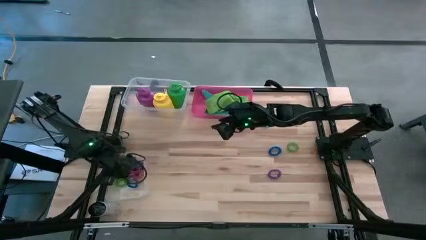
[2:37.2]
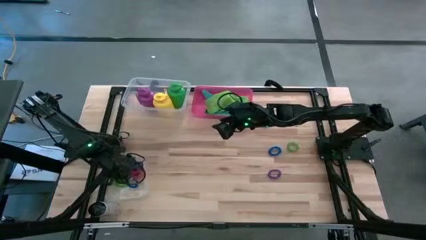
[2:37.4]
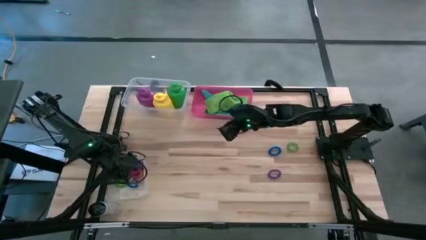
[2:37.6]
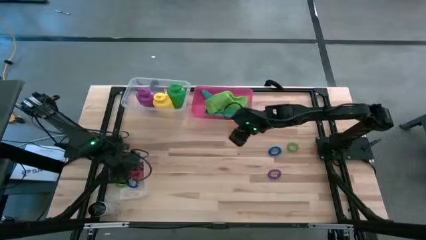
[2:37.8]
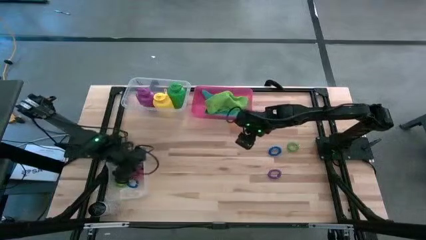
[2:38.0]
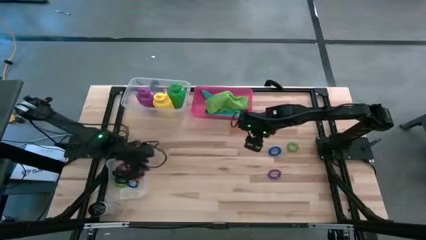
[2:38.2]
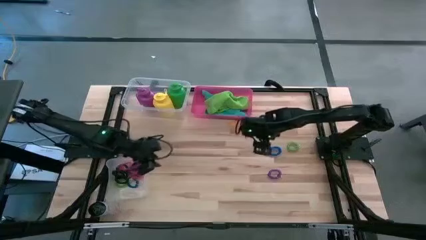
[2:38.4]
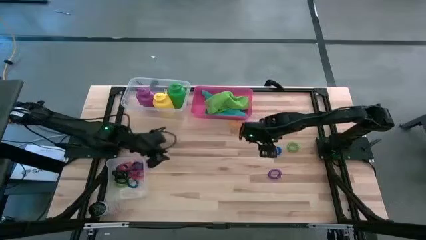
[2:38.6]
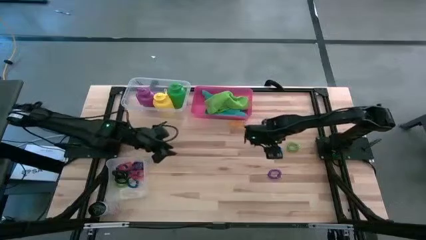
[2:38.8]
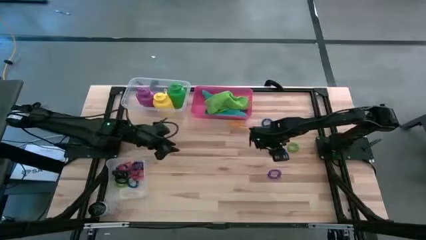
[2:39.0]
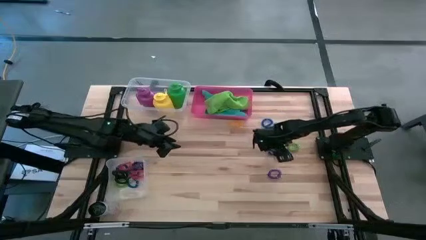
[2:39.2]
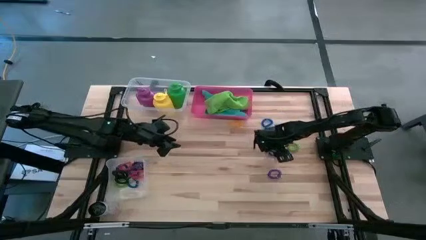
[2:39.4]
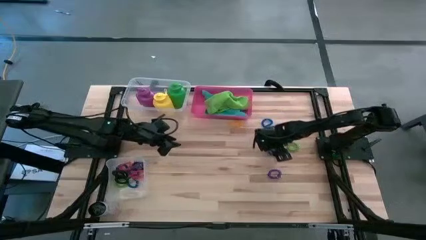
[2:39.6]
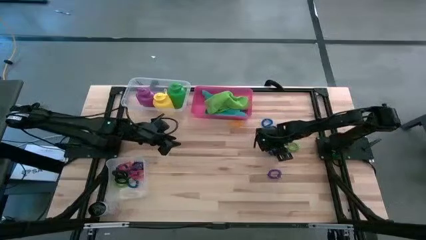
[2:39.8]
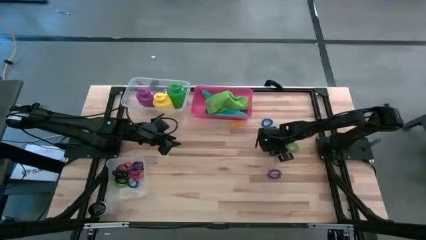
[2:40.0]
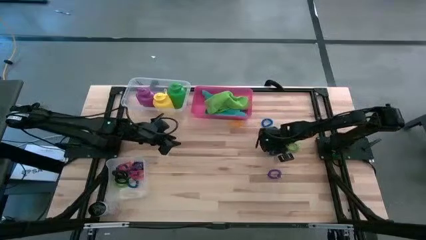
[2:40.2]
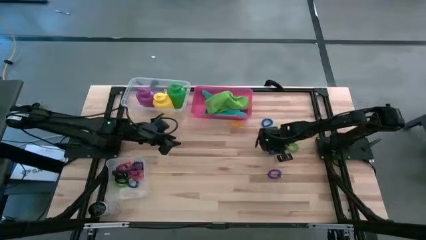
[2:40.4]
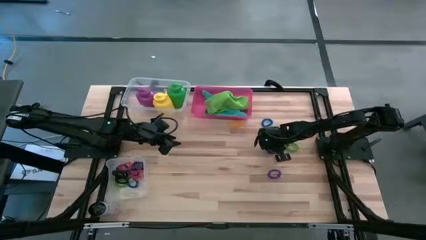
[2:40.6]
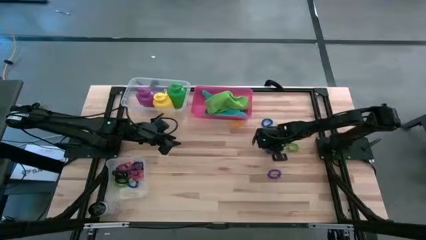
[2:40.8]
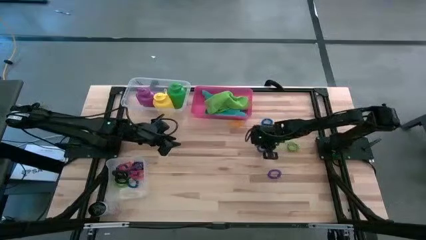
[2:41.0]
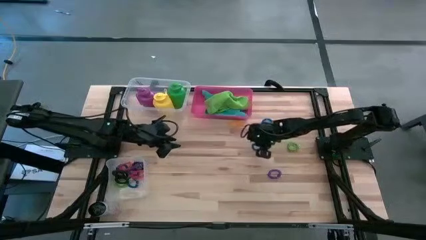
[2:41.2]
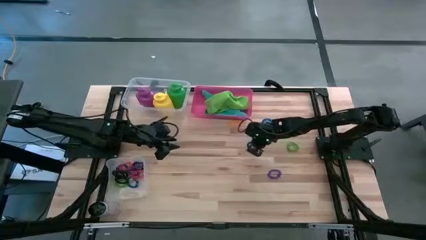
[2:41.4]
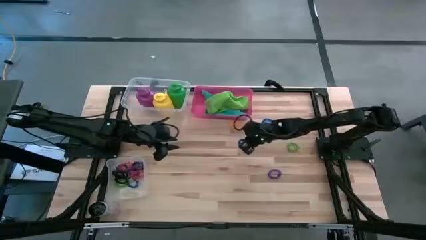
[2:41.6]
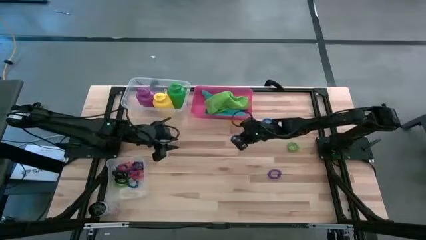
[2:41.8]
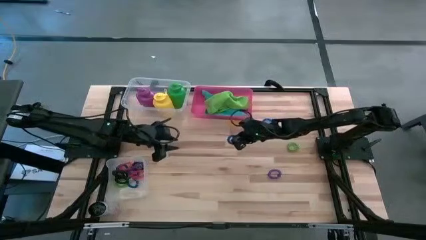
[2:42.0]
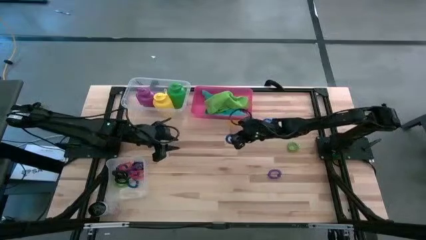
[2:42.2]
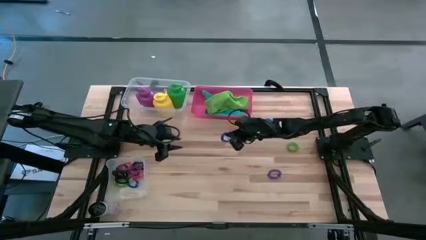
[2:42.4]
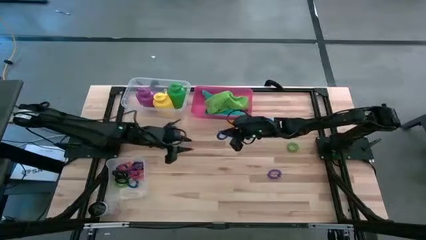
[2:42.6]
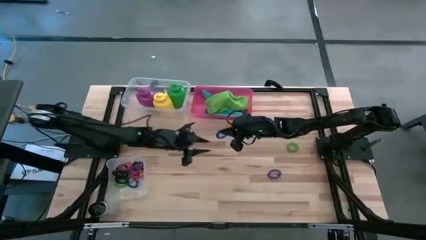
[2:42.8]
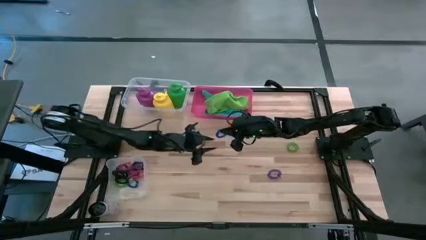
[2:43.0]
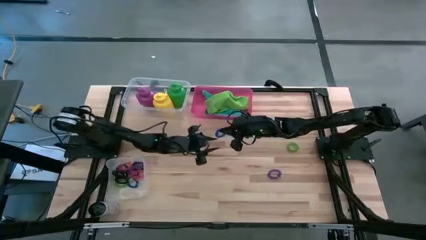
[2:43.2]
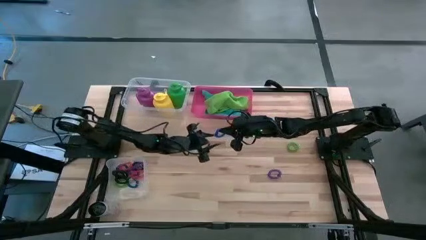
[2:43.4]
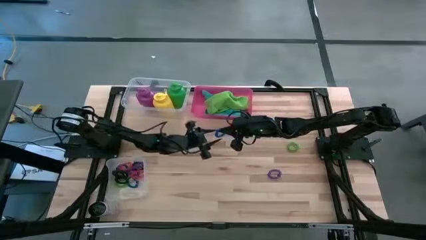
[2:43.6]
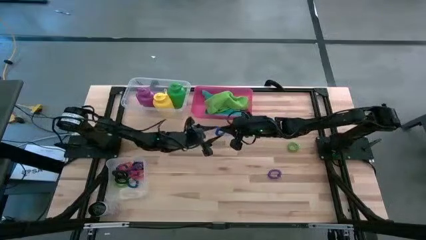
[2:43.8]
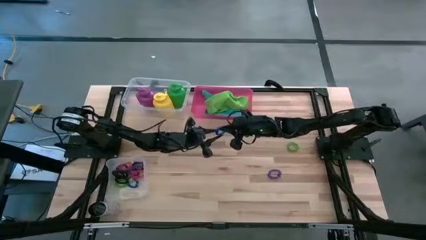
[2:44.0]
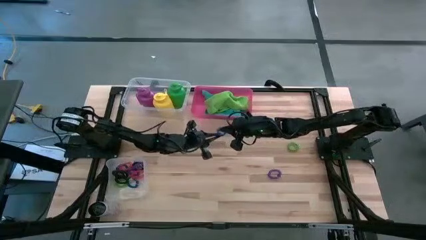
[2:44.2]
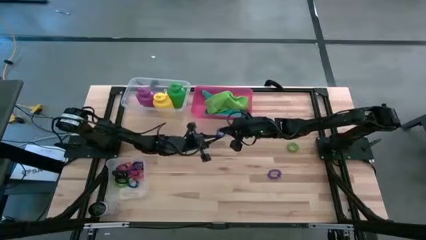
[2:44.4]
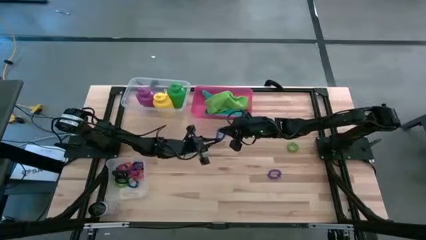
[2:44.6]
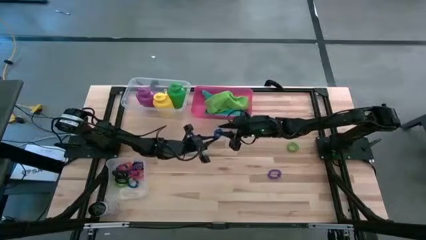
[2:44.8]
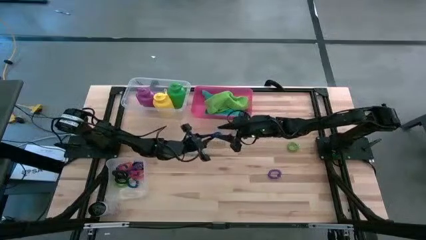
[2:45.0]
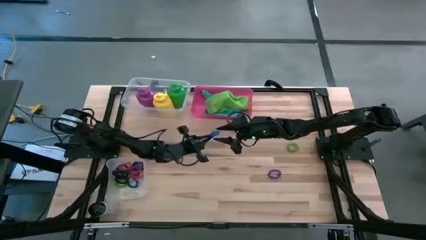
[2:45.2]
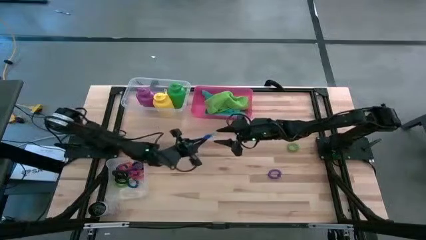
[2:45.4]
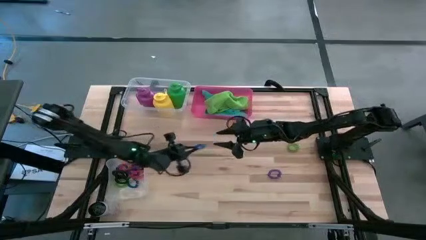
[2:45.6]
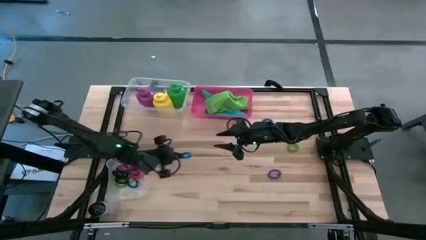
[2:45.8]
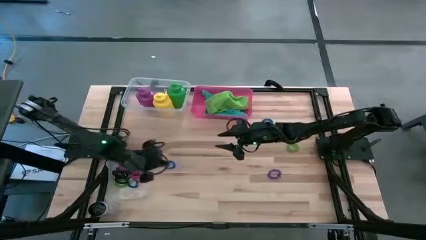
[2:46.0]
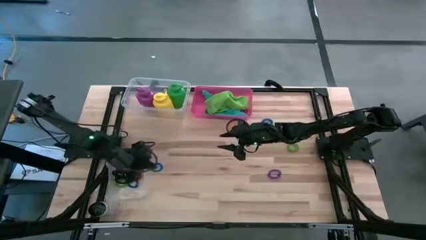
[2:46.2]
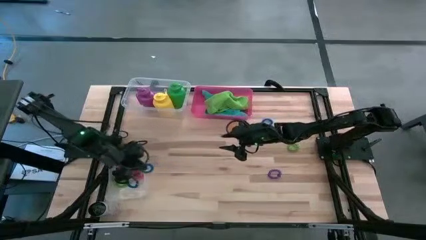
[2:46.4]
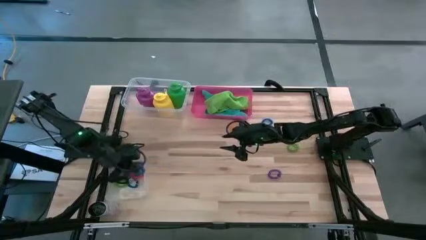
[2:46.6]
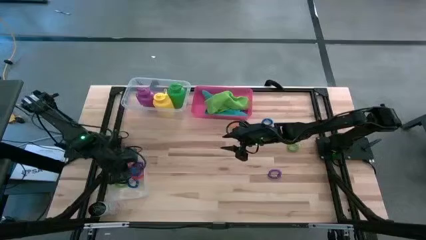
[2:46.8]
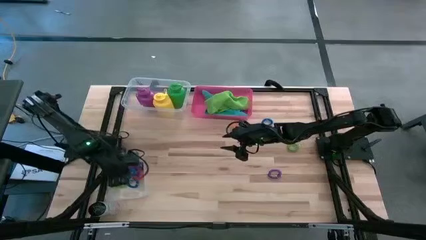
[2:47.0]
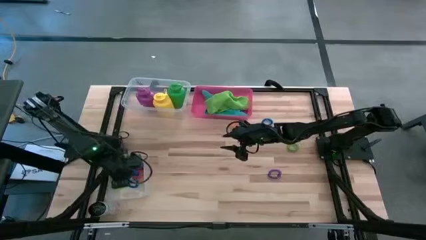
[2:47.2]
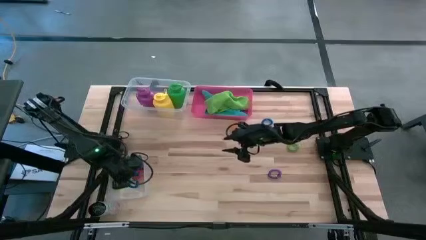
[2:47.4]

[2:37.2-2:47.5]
Task: Pick & Place Sports Items
Put the blue spring keychain into the bottom transparent bin

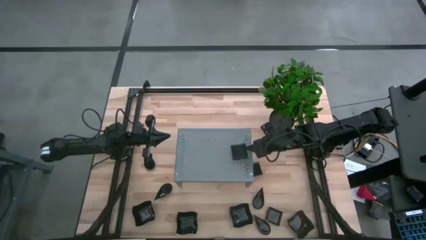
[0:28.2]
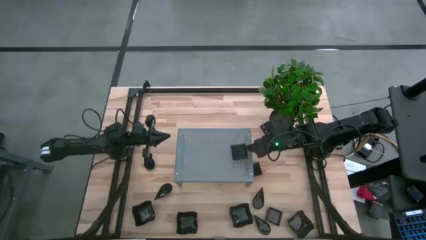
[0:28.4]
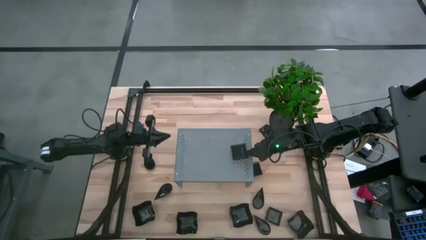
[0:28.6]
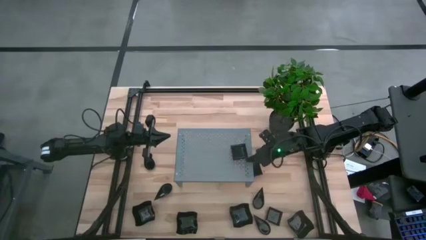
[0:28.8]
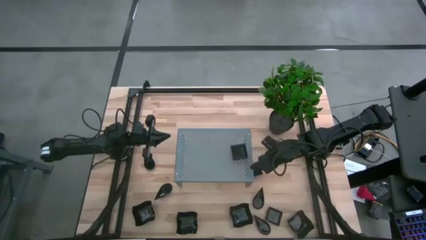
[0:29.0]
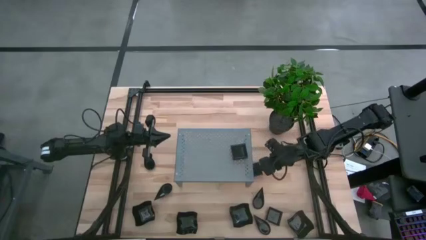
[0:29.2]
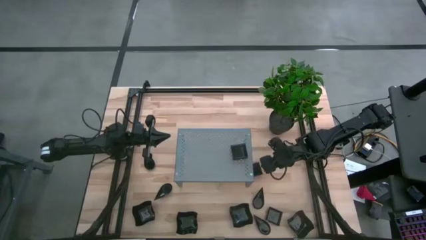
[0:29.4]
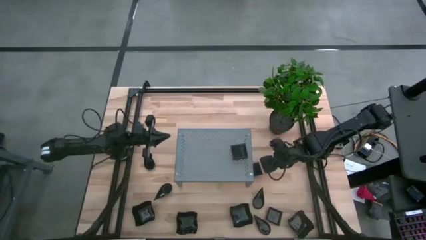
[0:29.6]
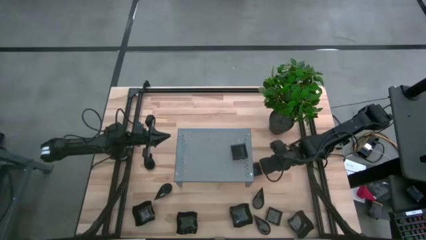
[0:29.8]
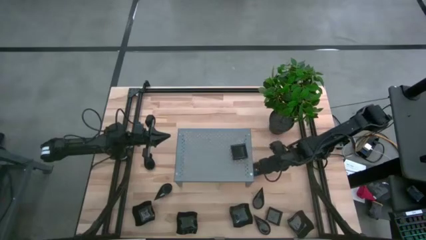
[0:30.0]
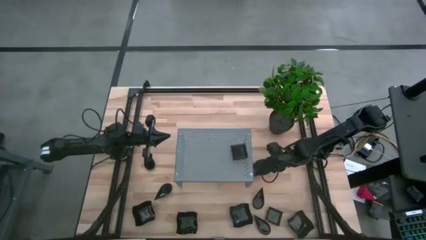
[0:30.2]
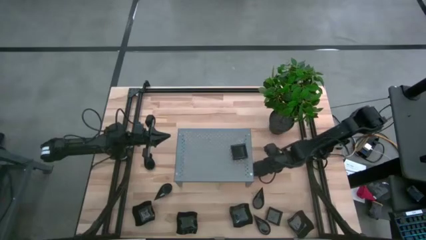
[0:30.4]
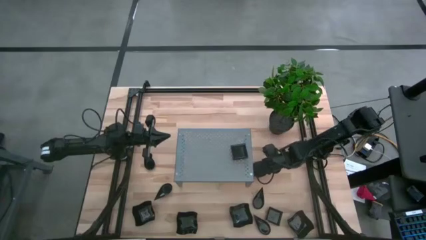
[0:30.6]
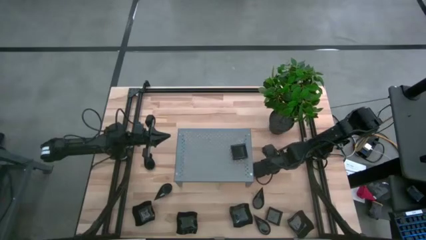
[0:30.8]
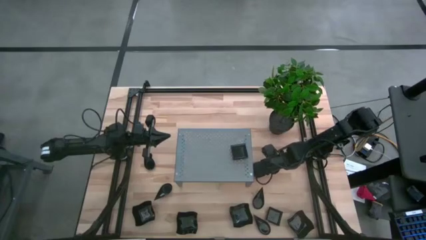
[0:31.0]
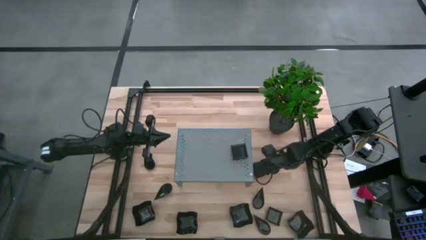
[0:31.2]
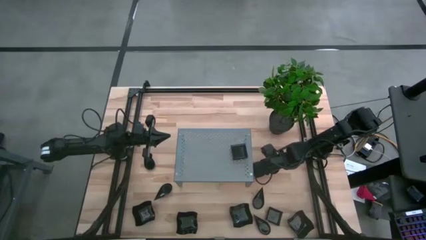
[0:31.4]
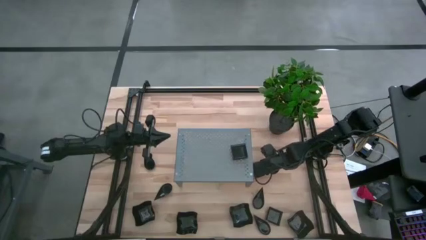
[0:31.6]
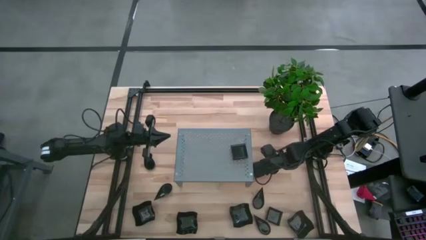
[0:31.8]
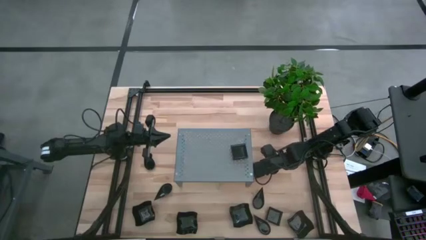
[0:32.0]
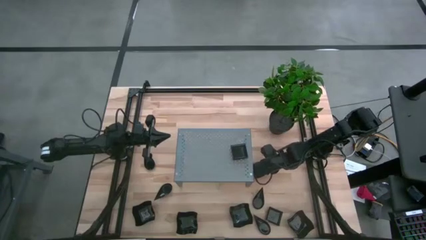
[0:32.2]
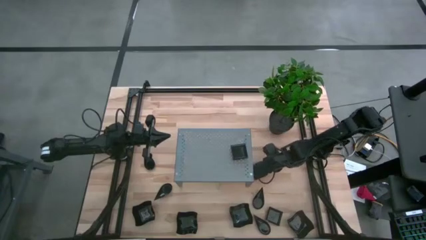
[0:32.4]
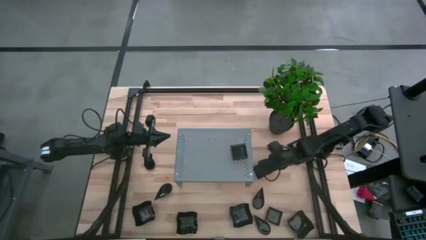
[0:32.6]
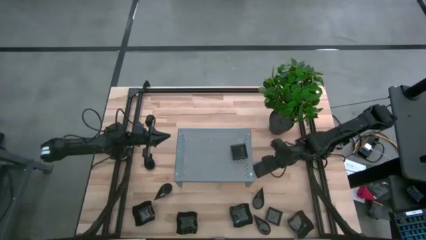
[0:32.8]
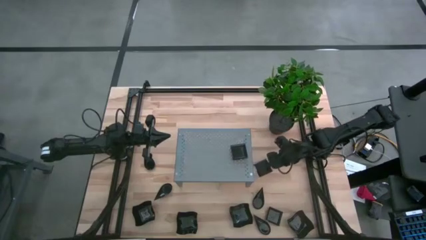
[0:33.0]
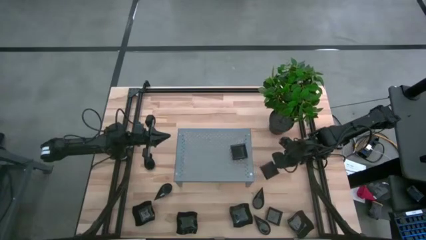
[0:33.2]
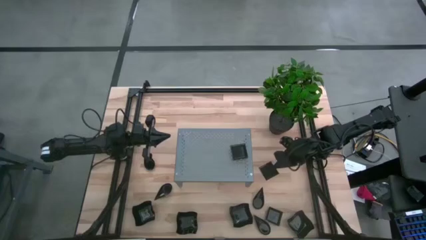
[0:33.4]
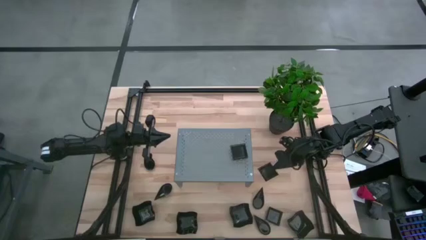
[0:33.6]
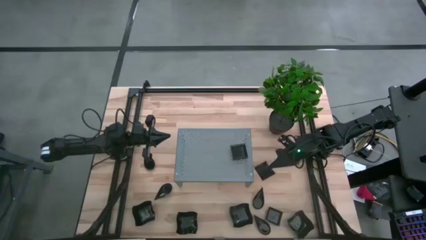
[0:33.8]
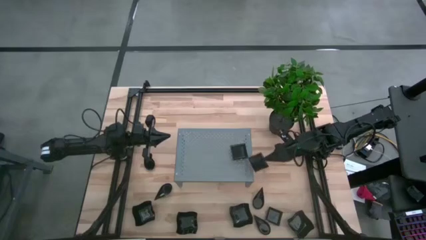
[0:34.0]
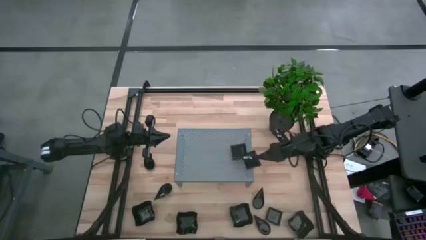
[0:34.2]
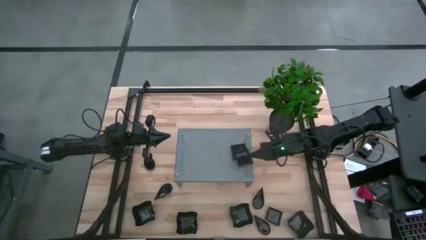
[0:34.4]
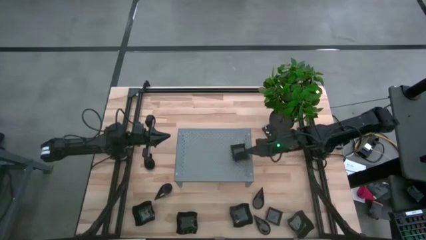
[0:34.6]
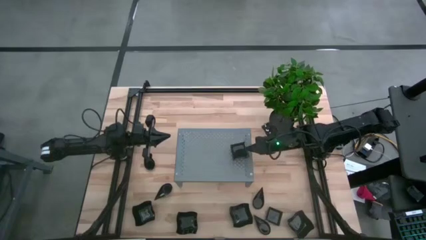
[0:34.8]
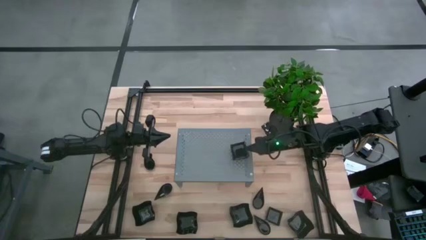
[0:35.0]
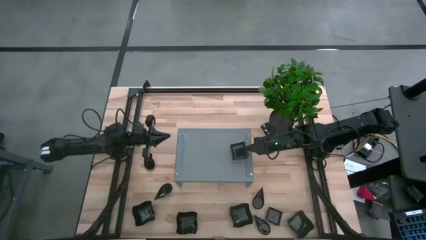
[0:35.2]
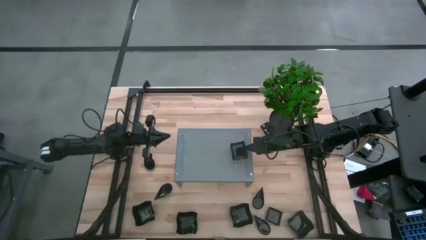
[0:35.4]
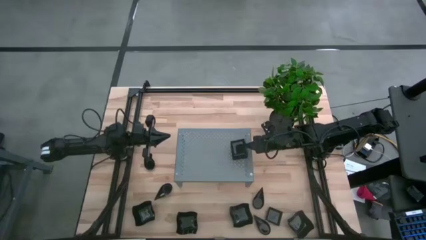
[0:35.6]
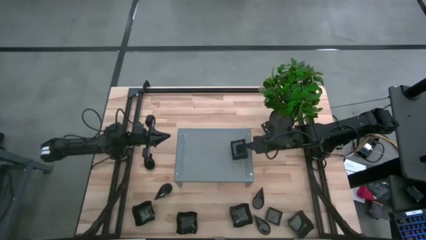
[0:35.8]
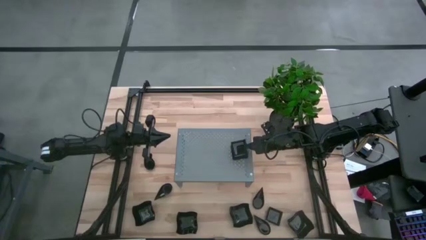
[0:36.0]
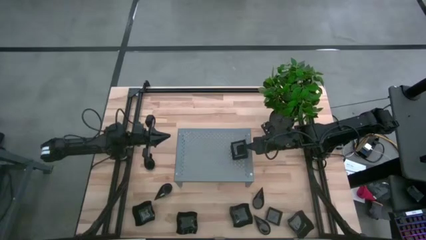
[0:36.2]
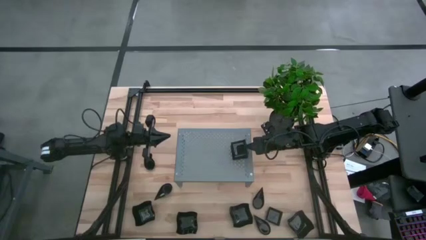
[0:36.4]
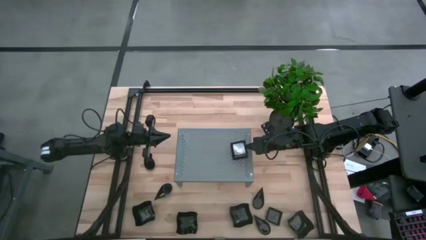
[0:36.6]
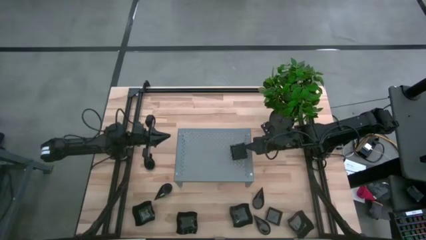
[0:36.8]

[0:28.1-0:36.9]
Task: Pick & Place Mini shaped plates
Stack the black square plate on the black square plates on the shelf
